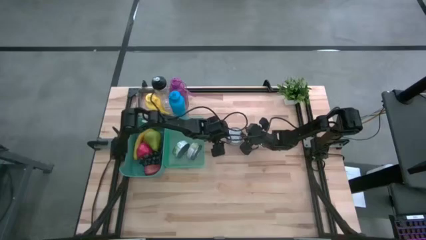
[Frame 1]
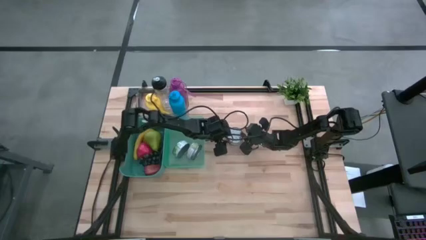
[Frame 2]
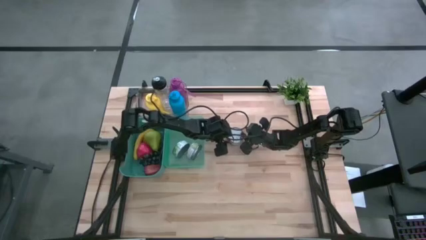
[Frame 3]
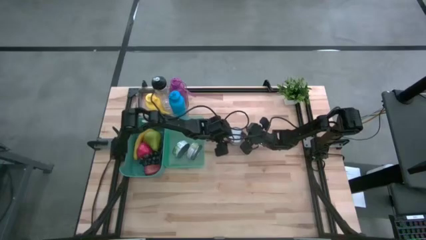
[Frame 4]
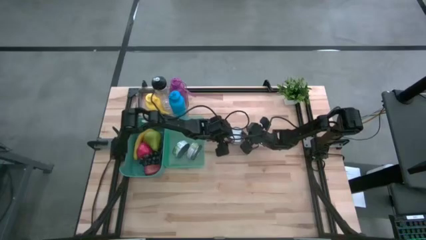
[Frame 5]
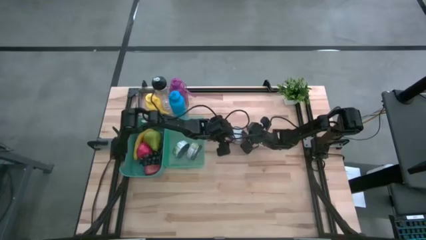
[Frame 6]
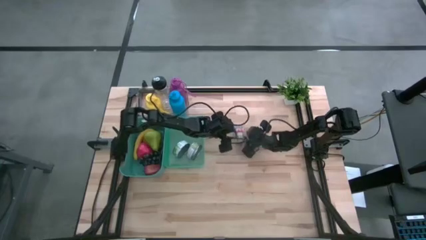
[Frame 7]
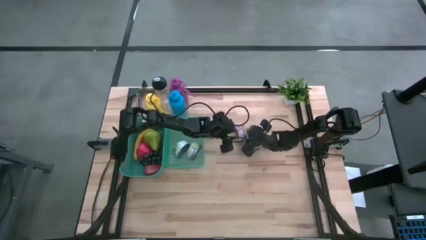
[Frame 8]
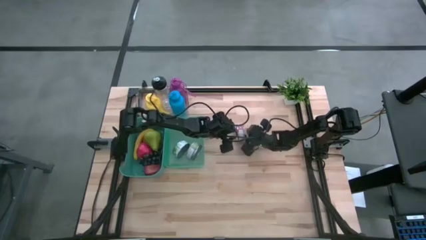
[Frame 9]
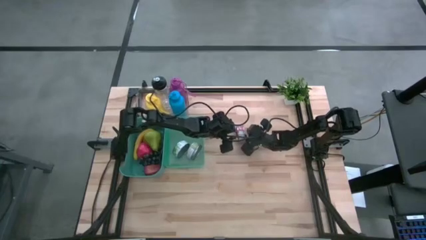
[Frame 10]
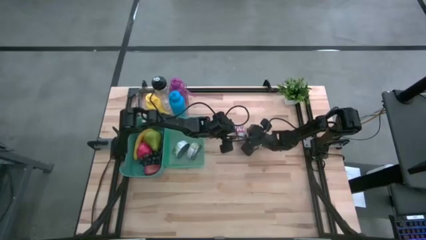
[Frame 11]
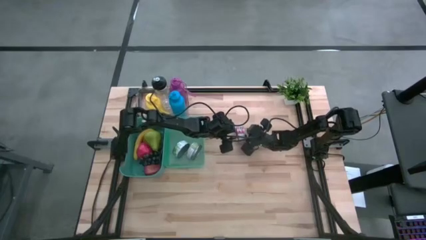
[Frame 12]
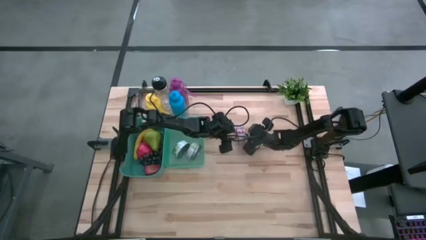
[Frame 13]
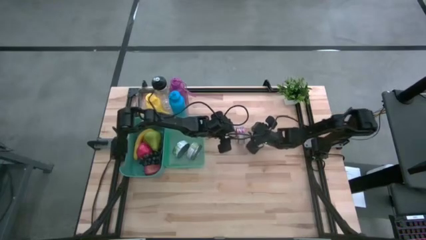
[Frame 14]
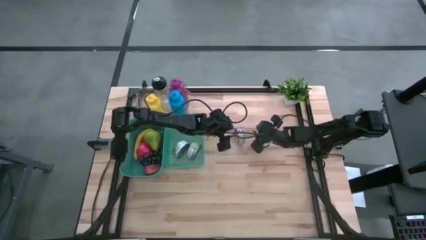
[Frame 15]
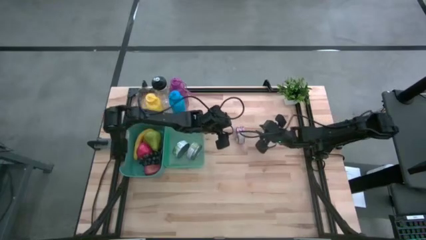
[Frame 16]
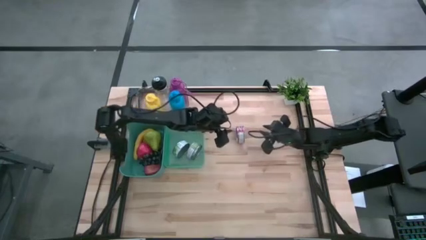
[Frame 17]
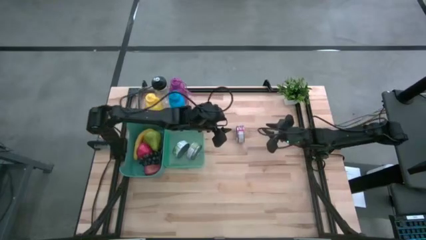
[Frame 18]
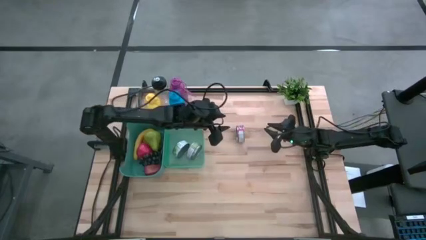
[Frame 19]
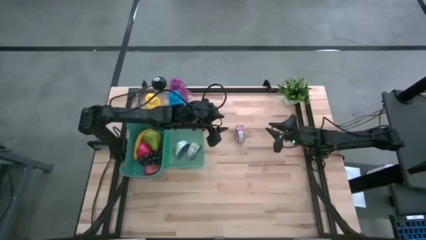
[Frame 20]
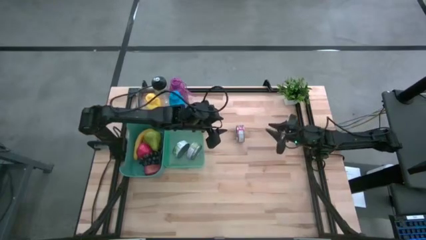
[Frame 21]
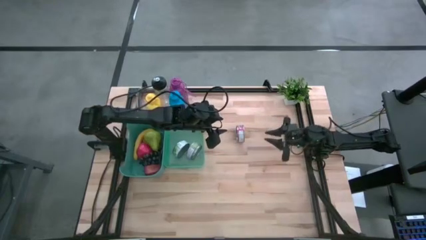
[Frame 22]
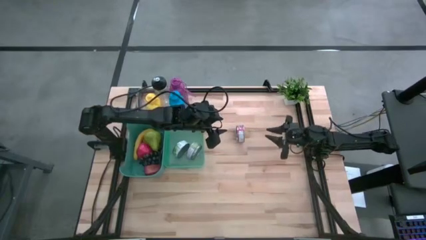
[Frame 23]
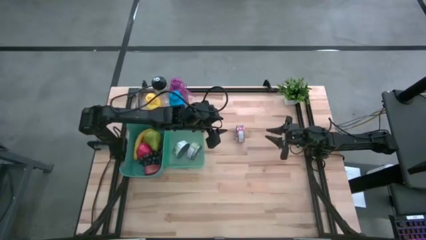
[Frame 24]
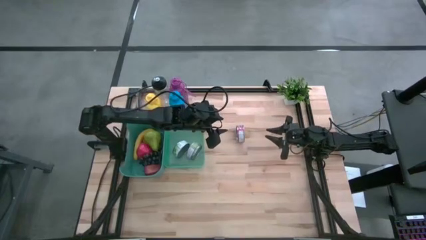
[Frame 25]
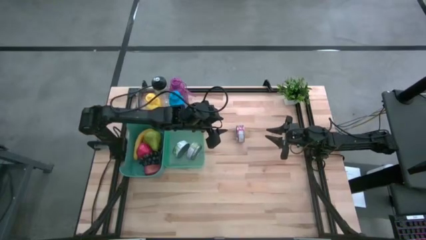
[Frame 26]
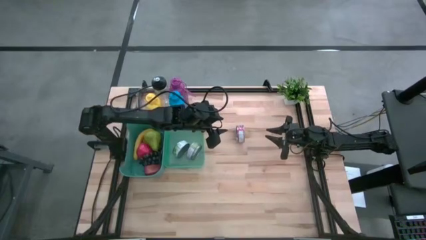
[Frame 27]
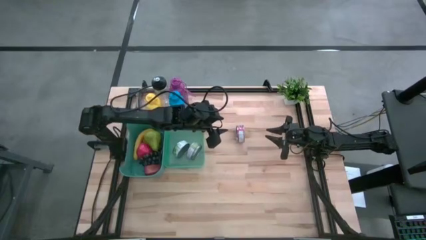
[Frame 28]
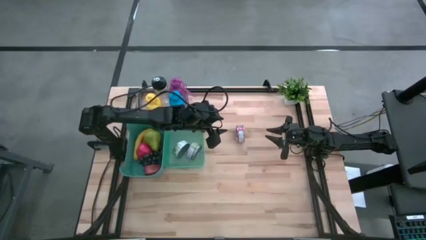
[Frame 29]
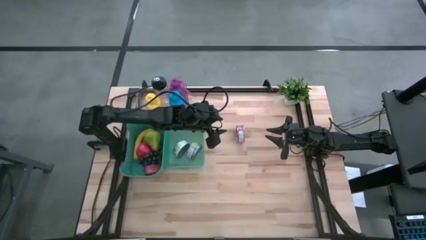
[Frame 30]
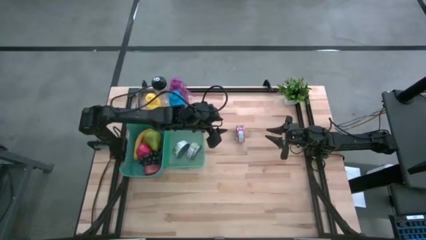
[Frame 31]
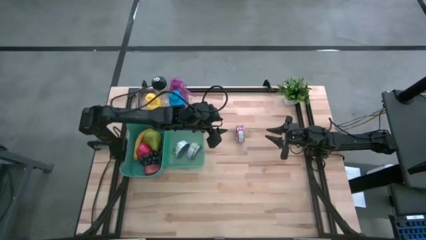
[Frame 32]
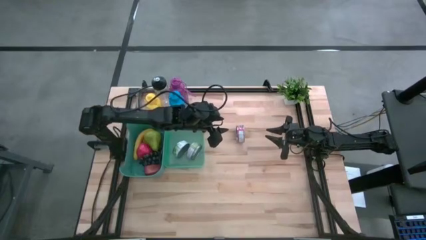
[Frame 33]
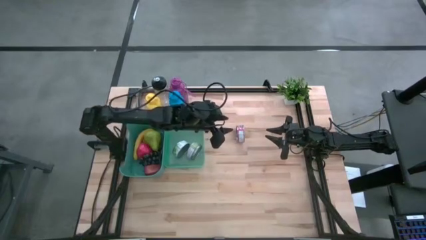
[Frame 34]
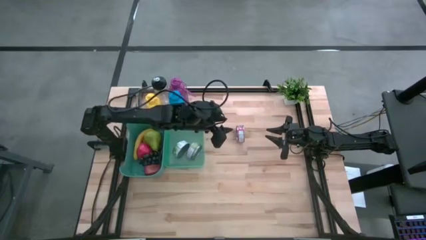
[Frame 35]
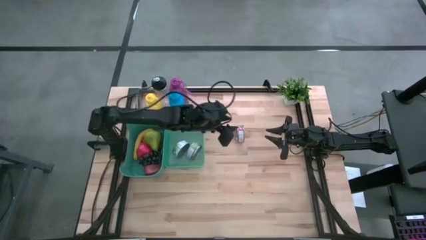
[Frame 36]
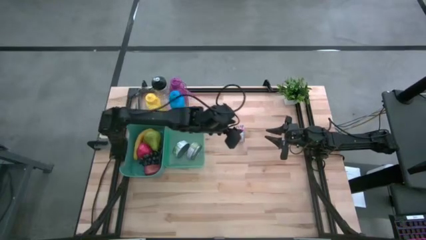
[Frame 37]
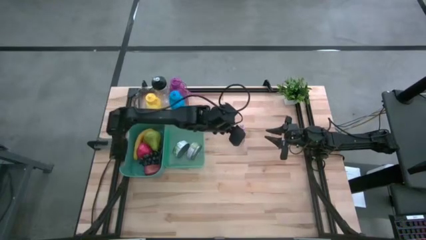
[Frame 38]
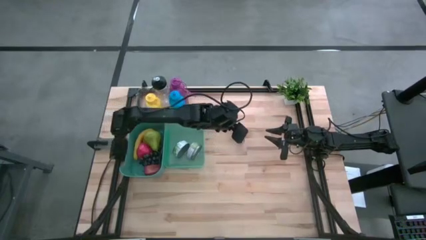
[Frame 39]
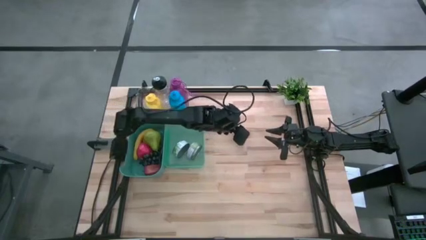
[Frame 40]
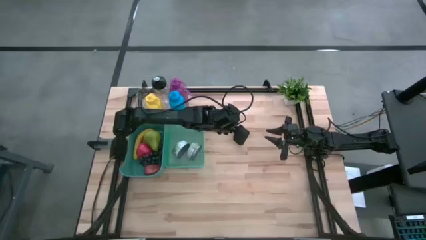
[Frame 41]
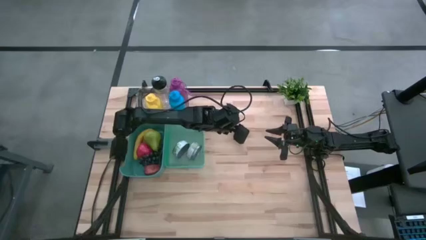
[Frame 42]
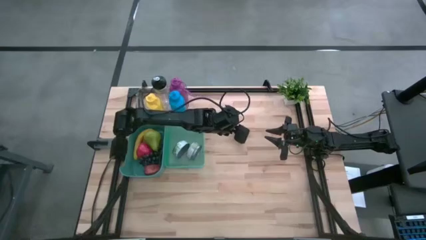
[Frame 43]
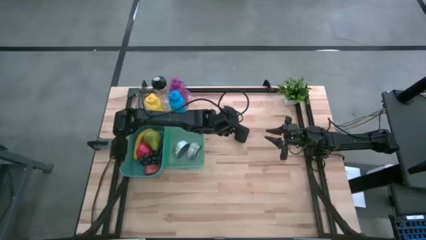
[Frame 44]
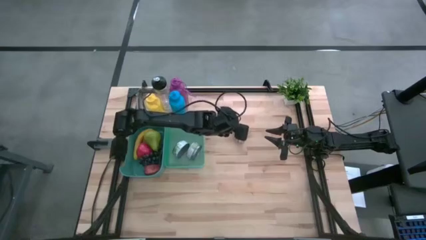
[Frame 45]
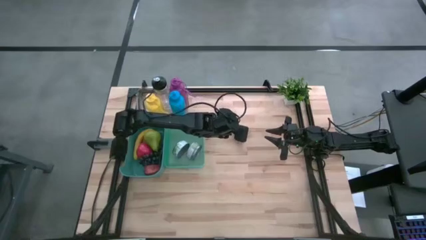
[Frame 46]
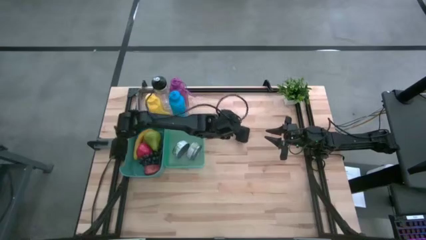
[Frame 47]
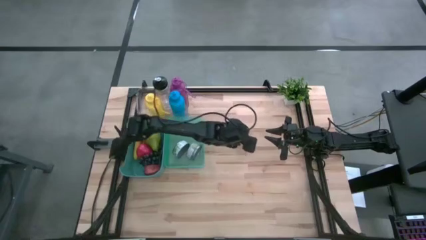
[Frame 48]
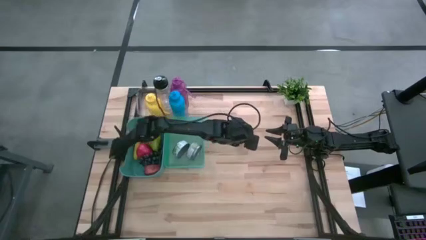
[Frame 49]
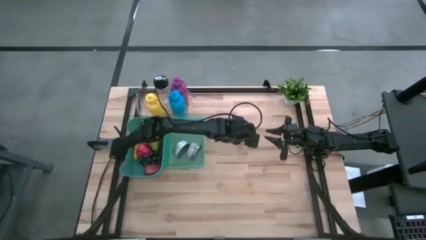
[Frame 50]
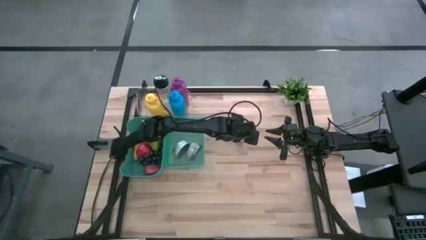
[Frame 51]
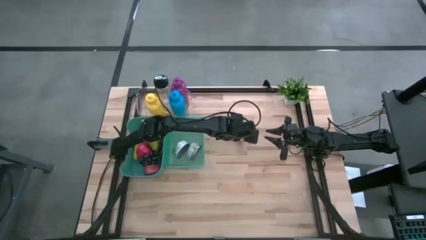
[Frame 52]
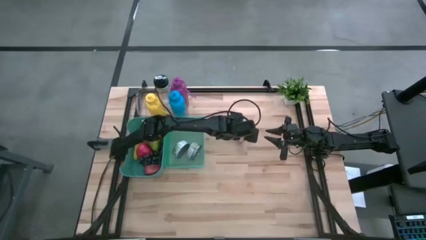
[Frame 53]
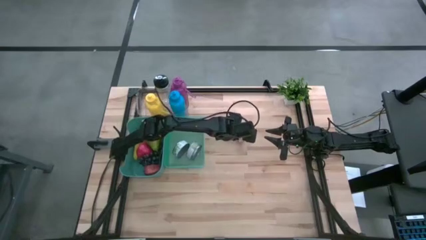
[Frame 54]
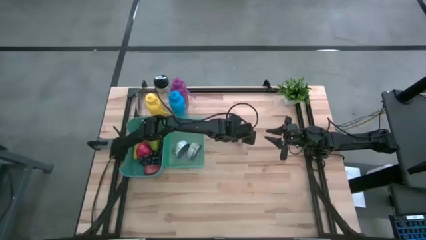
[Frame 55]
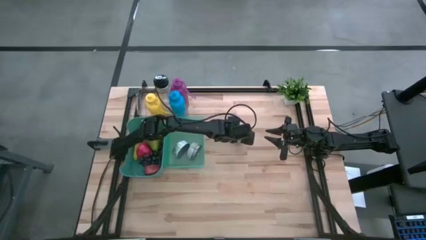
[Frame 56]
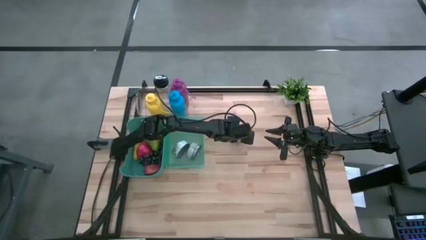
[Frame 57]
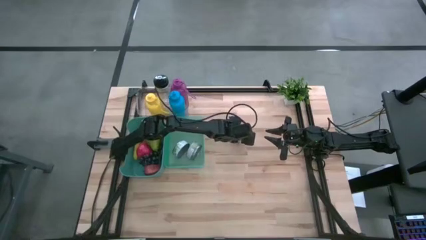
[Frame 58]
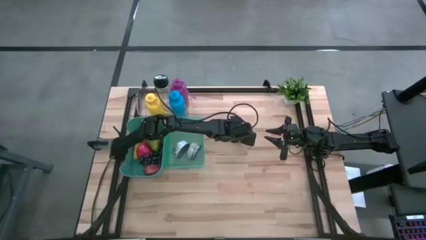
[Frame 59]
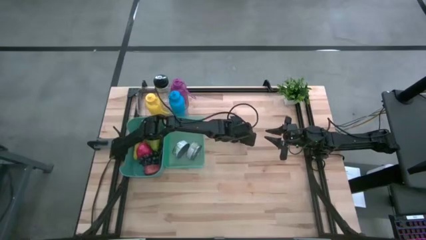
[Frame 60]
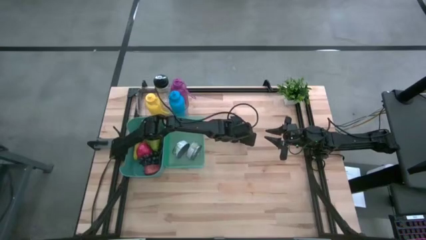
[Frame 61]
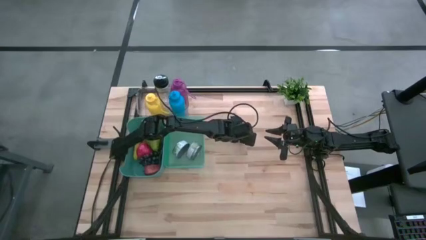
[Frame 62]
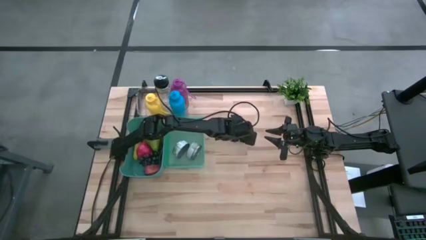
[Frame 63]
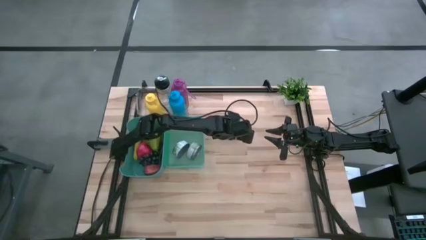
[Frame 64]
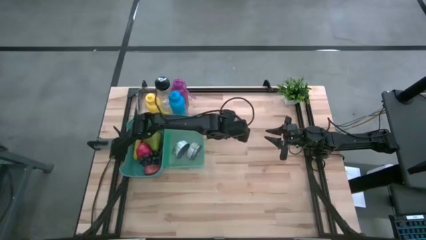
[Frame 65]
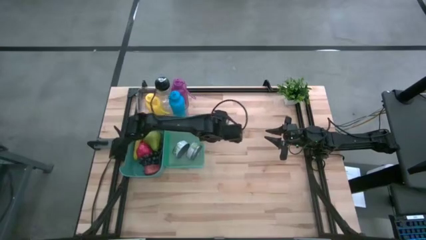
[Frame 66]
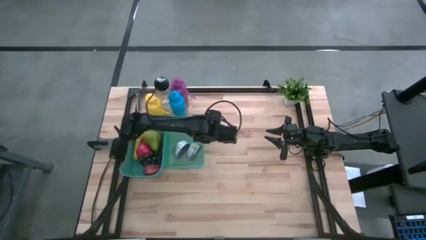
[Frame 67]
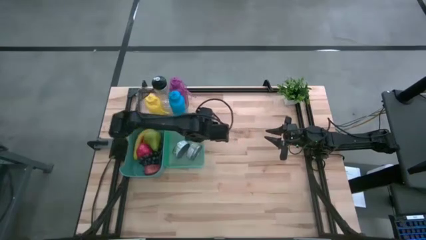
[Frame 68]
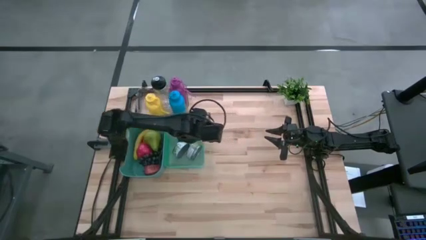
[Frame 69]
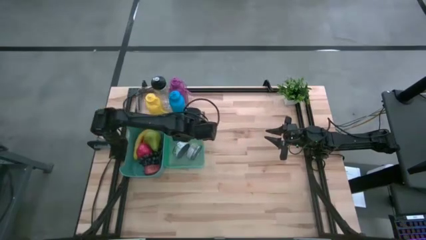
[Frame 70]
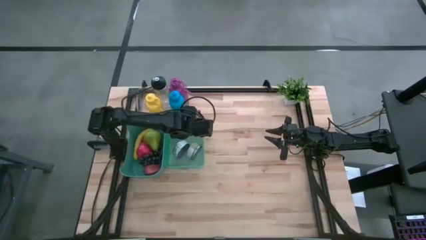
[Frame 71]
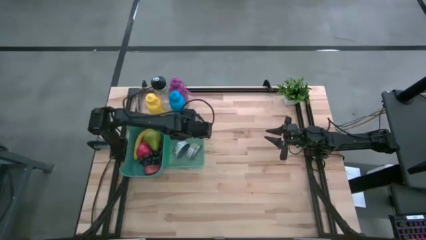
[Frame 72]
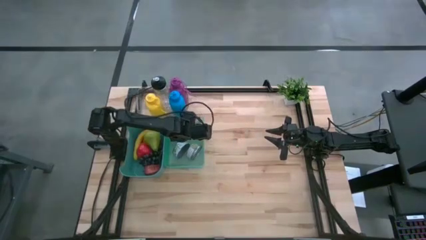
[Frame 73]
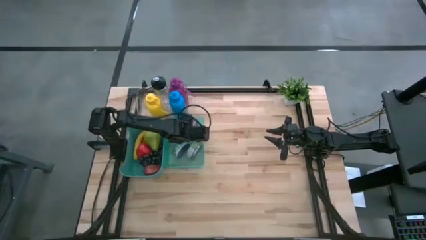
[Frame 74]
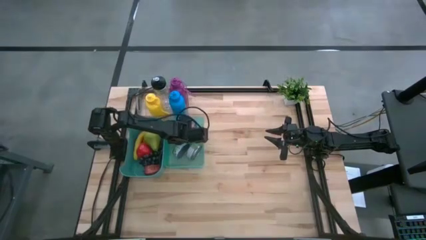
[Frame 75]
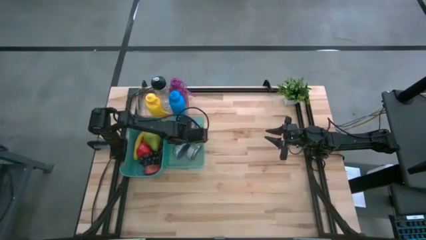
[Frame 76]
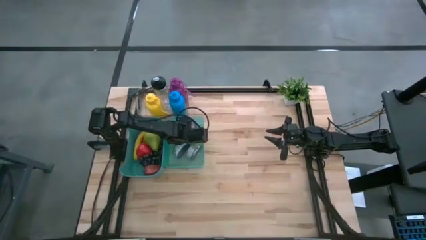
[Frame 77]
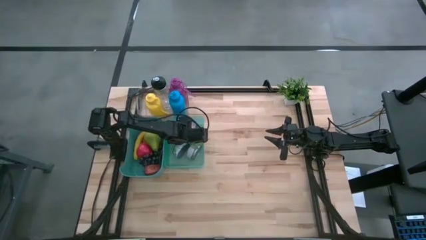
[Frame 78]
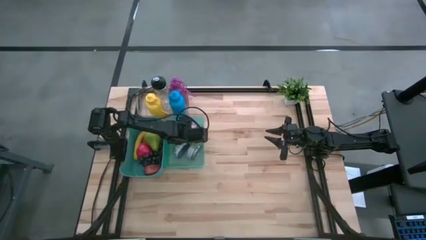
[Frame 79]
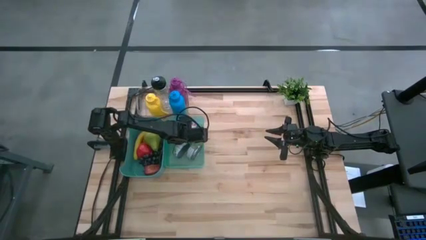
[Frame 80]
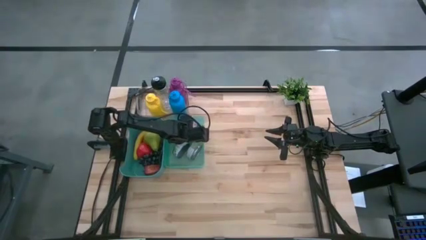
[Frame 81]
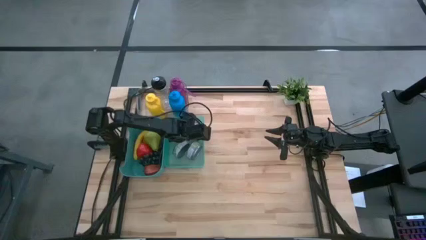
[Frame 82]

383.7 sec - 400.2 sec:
Task: Pick & Place Food Item
Put the red tuna can into the light green bin
